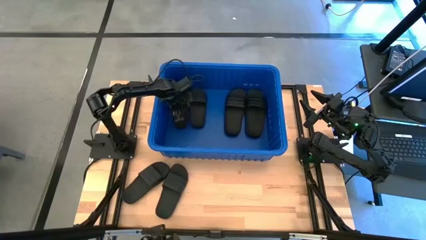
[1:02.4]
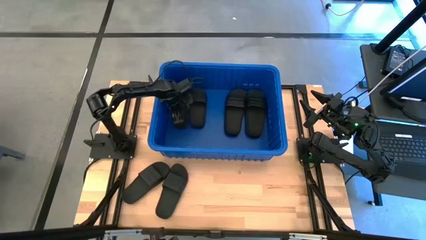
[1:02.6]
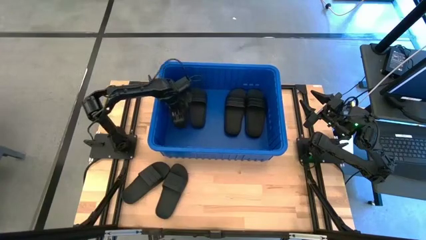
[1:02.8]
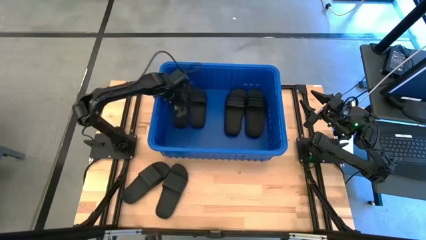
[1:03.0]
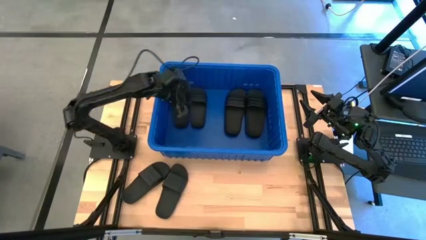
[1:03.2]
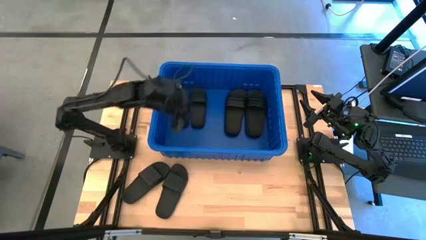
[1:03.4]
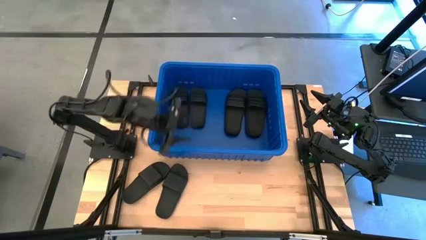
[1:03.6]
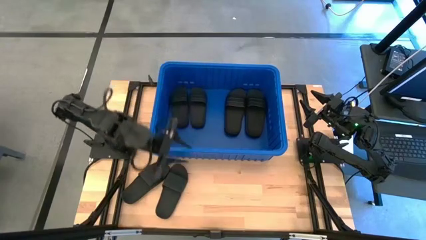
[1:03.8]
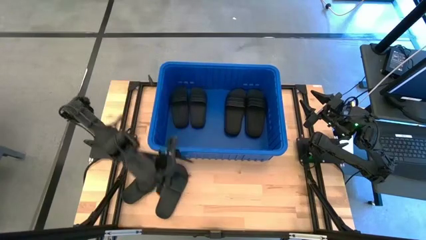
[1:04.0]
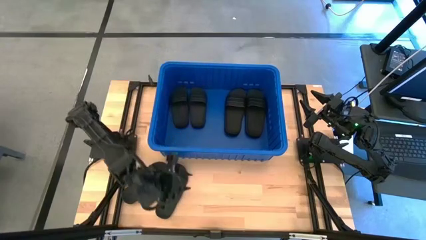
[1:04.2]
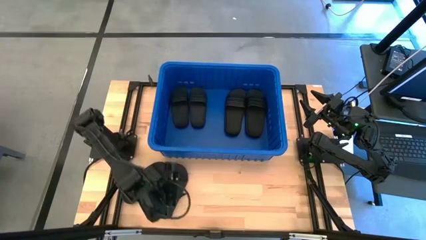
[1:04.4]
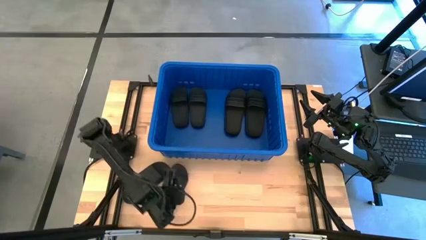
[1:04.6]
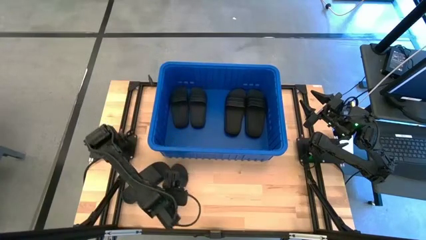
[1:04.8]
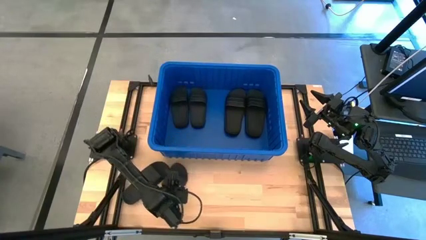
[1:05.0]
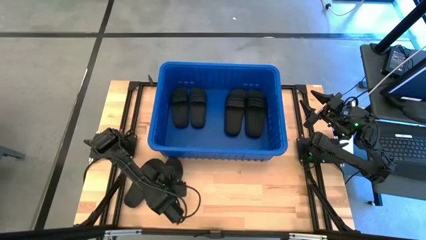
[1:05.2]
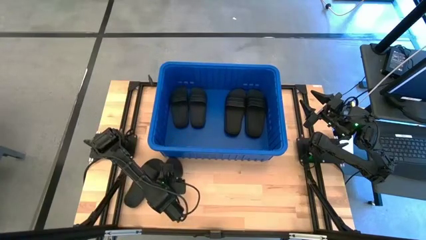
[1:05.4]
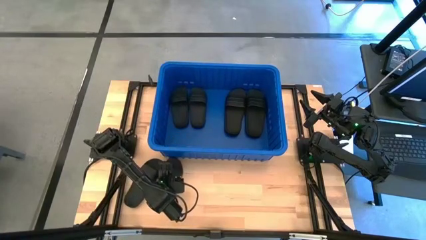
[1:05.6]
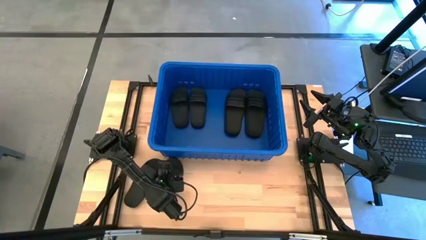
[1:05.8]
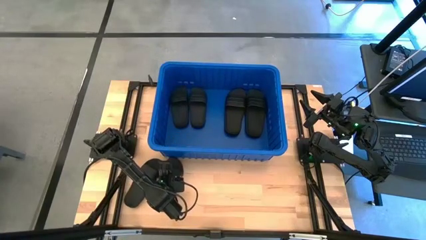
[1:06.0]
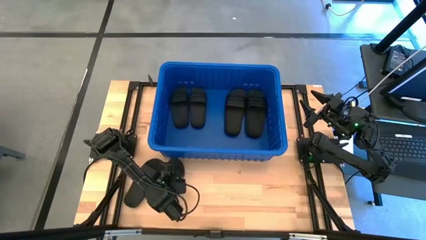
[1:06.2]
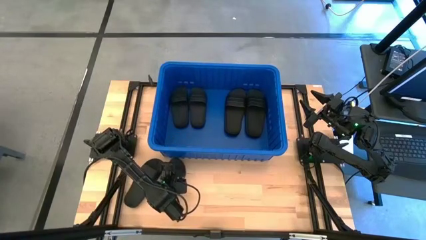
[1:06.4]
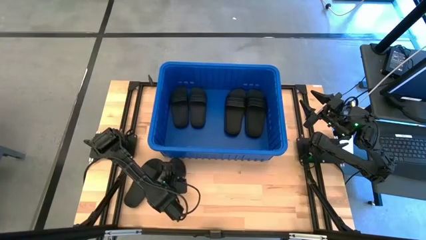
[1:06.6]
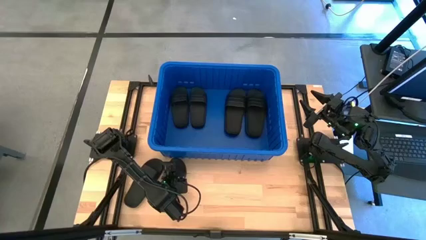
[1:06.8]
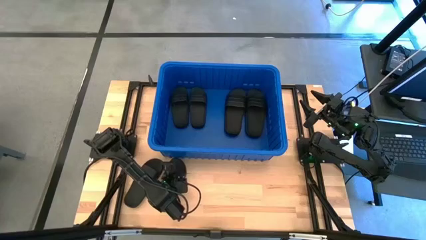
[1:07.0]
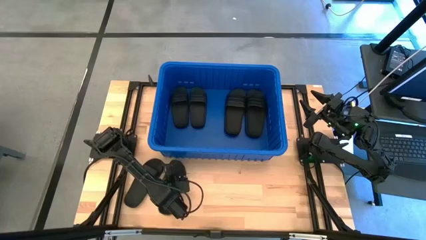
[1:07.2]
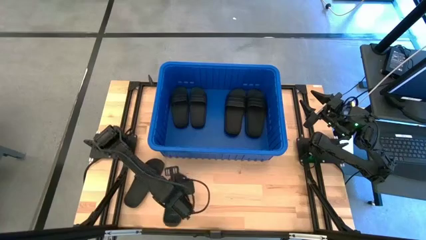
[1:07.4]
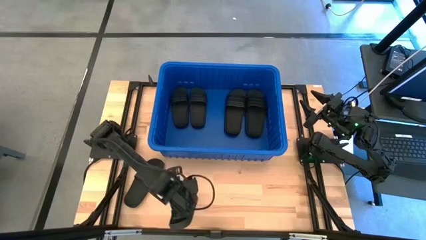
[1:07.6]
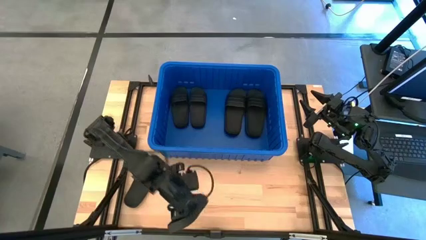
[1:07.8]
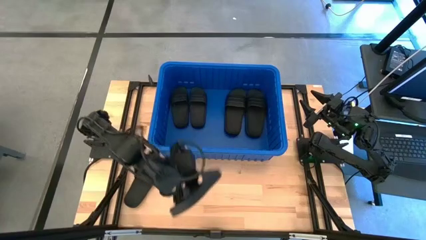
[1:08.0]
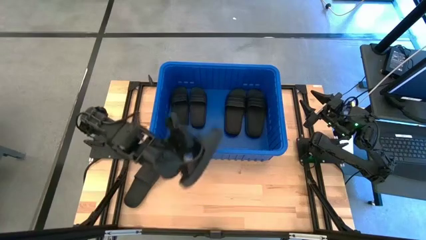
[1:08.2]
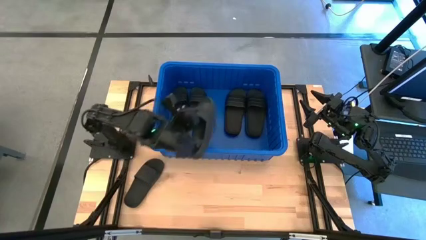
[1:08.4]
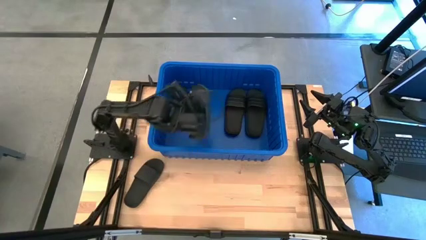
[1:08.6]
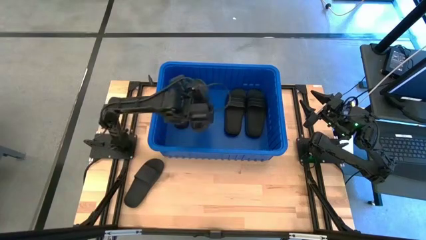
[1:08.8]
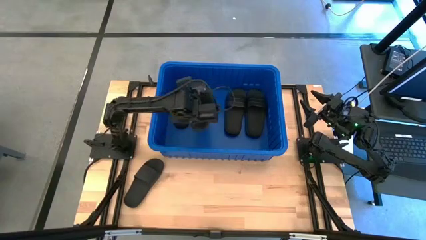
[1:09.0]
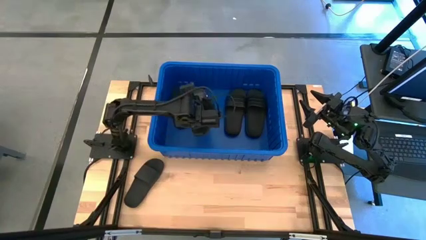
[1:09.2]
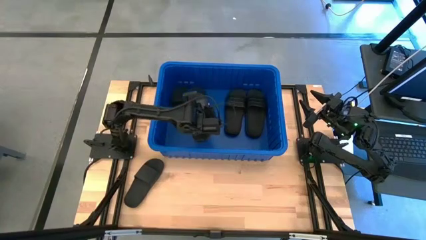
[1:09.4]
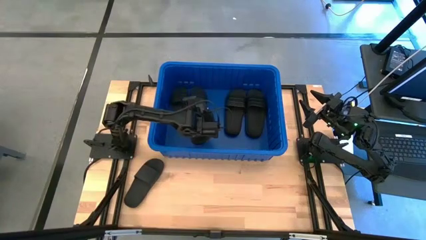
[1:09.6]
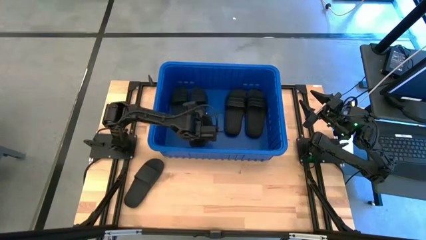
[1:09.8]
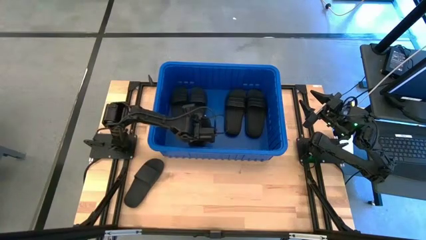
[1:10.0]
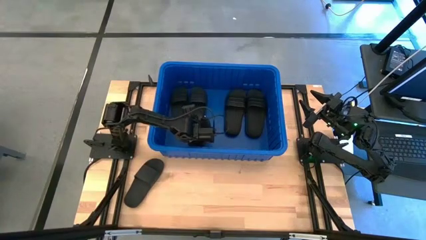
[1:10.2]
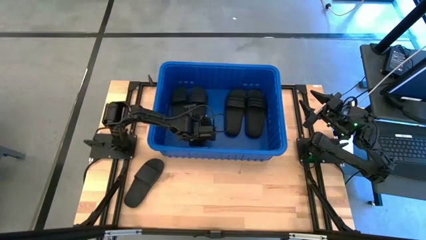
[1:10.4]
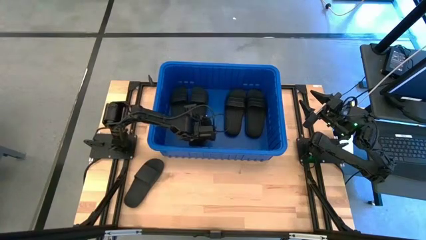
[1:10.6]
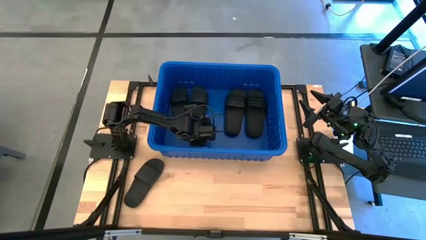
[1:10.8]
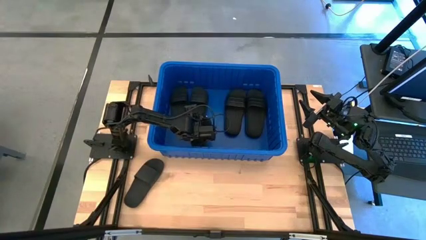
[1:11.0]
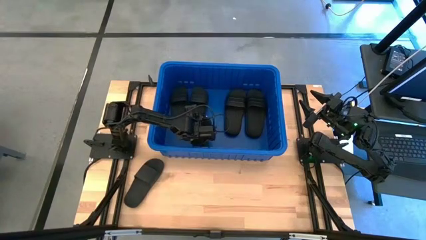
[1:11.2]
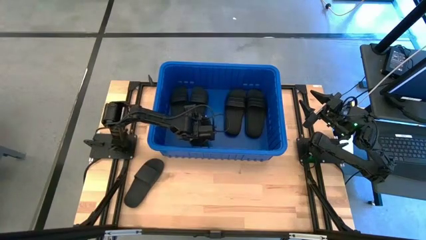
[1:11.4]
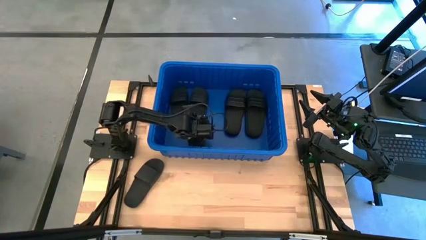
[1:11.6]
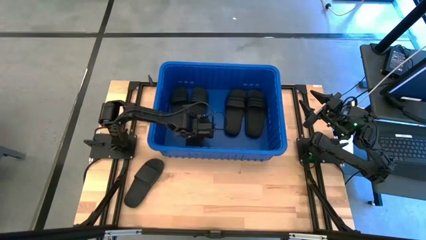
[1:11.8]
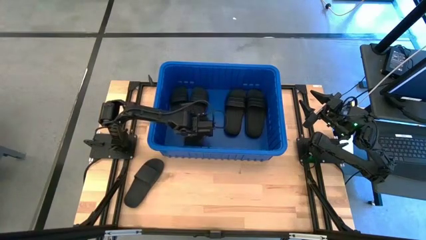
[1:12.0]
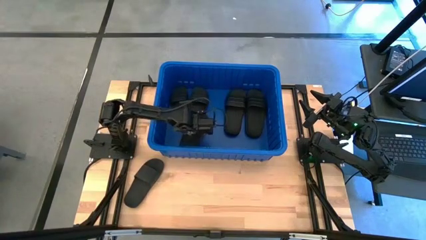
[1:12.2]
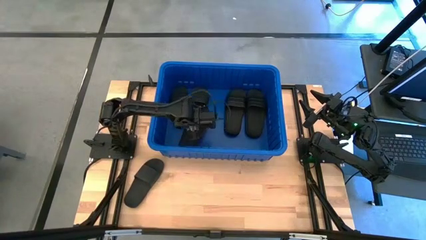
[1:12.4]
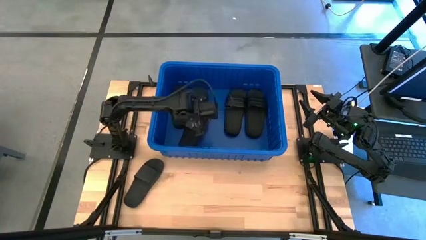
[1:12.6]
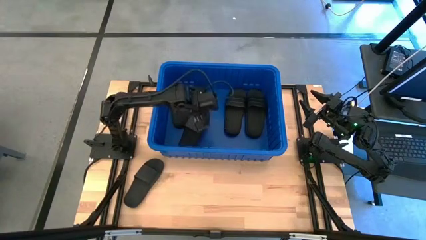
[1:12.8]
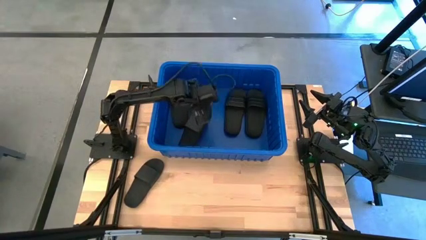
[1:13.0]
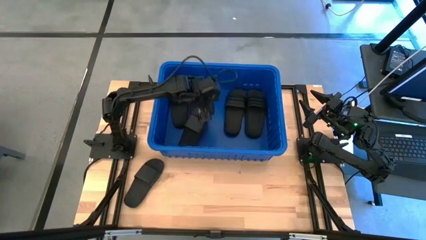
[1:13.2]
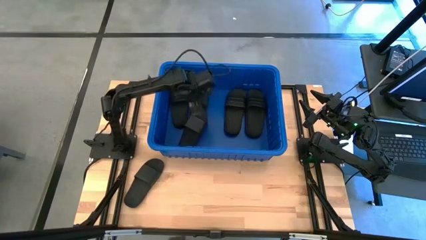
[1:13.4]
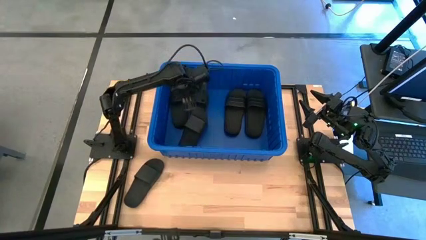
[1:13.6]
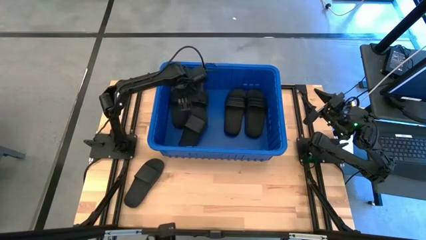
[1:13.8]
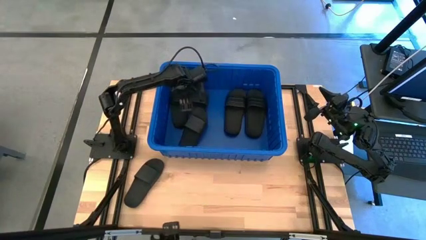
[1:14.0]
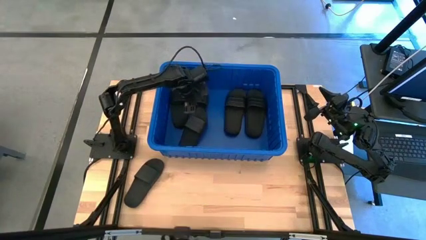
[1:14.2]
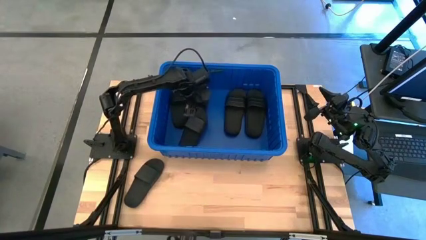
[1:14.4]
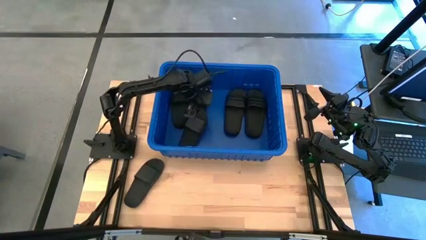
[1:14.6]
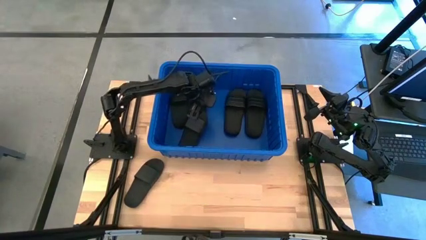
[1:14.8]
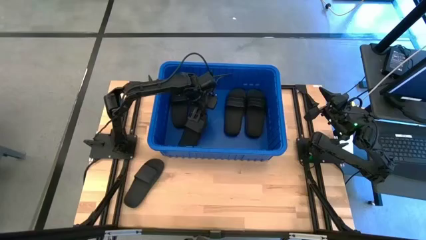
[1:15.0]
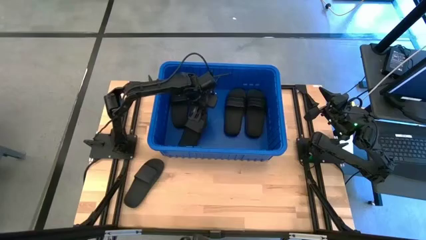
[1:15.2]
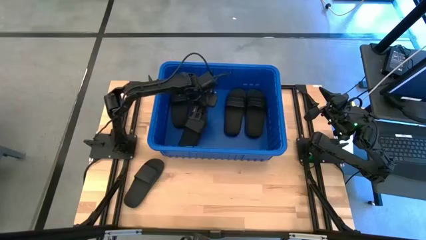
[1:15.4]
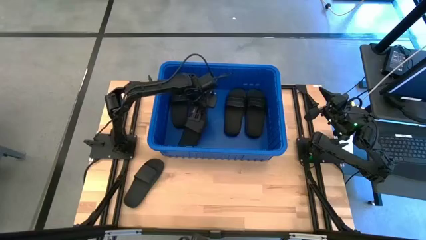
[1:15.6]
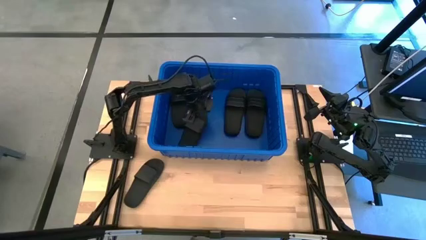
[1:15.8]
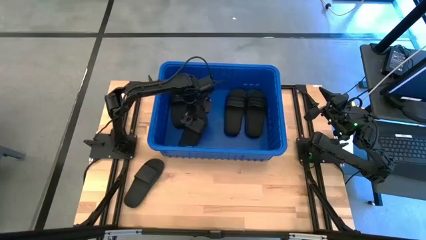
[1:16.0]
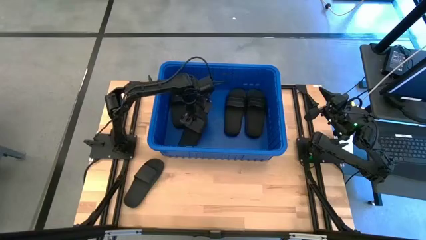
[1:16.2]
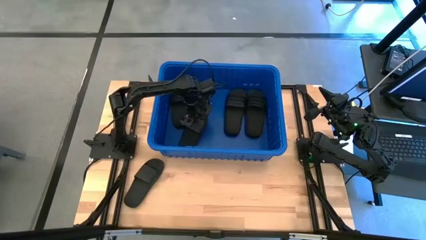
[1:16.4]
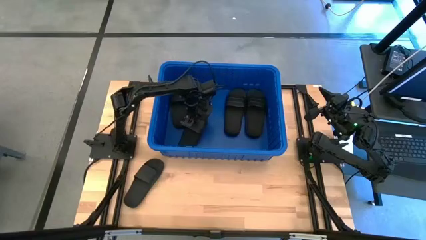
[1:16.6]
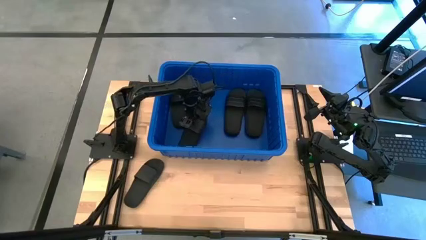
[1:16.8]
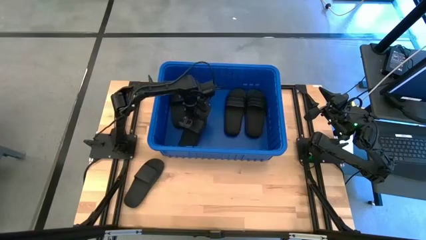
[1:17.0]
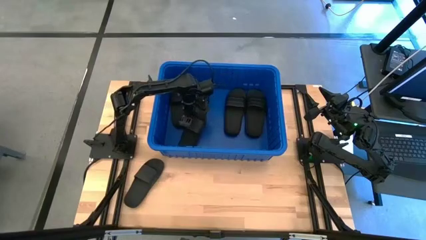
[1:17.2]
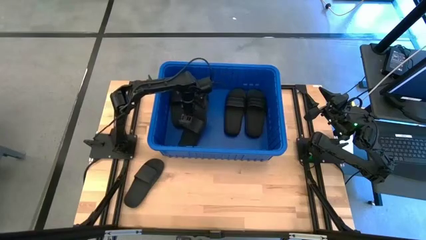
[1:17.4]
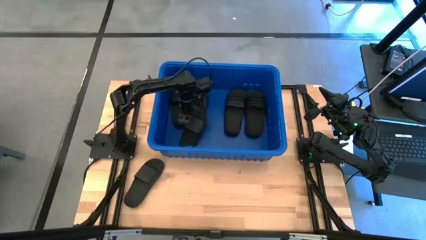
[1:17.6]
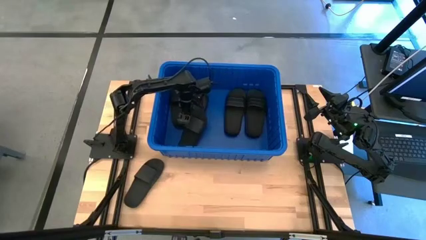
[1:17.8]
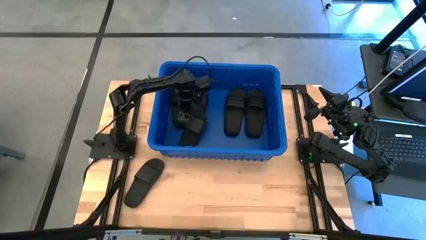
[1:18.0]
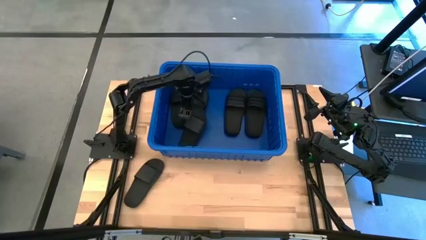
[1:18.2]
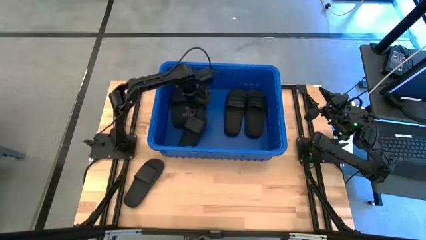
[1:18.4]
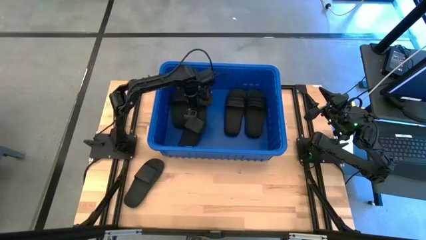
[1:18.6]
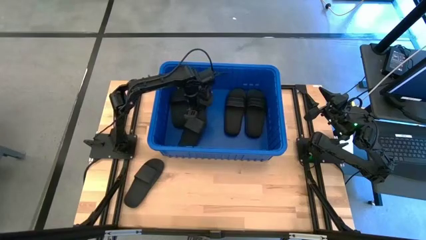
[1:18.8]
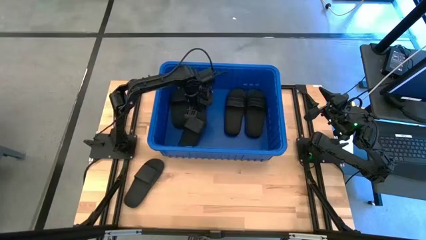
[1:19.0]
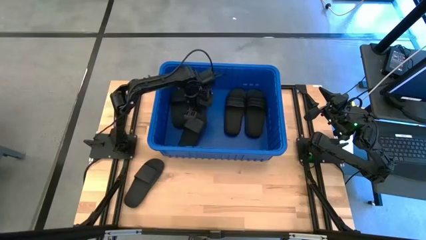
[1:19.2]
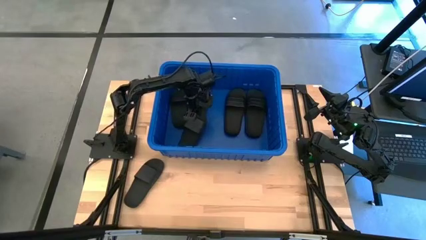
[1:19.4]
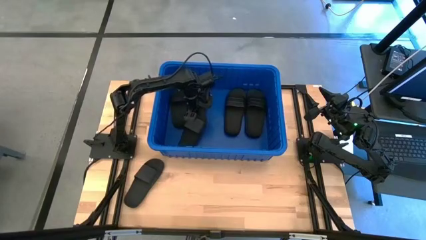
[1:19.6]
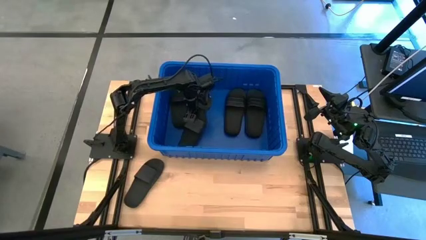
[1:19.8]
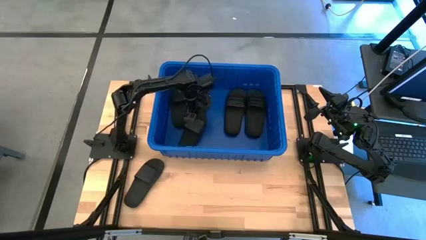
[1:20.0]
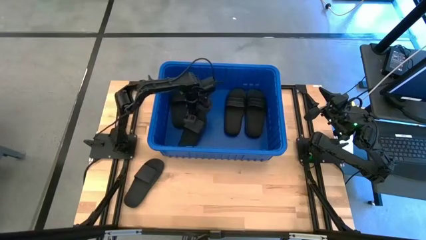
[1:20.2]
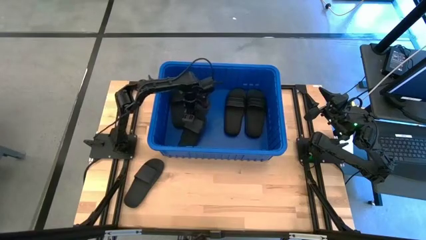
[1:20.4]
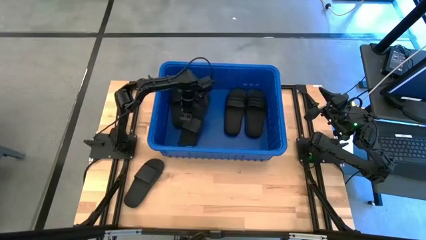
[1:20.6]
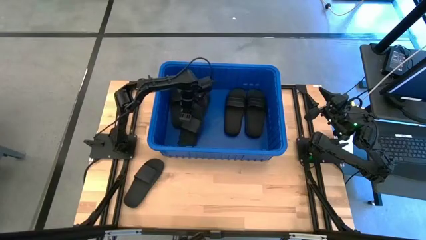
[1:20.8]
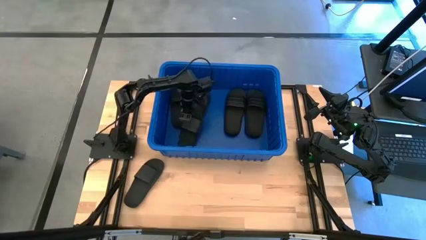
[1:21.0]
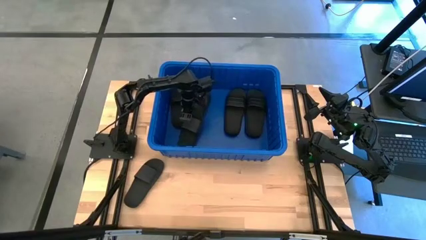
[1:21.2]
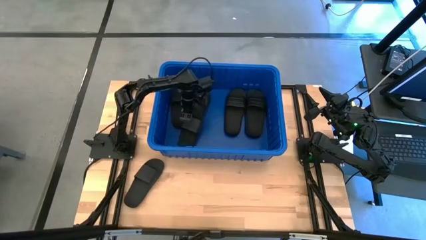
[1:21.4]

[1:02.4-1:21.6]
Task: Pick and place slides into bin
Put the black slide into the blue bin
